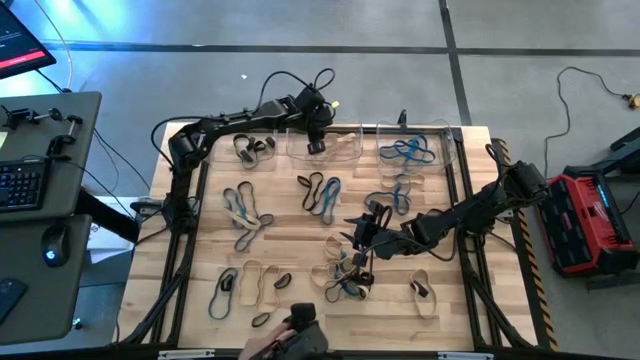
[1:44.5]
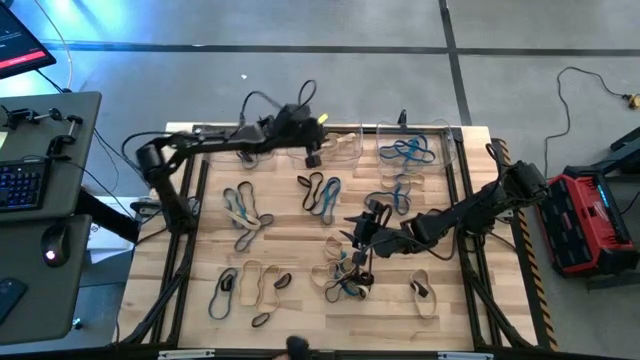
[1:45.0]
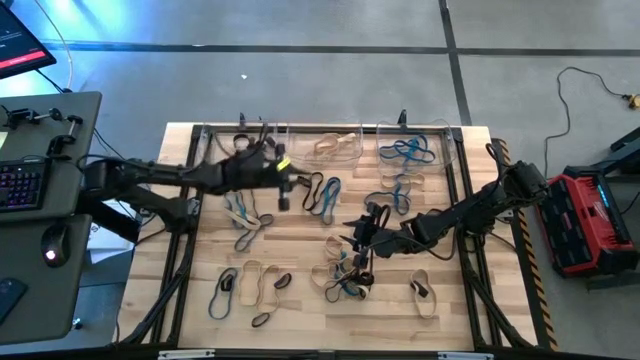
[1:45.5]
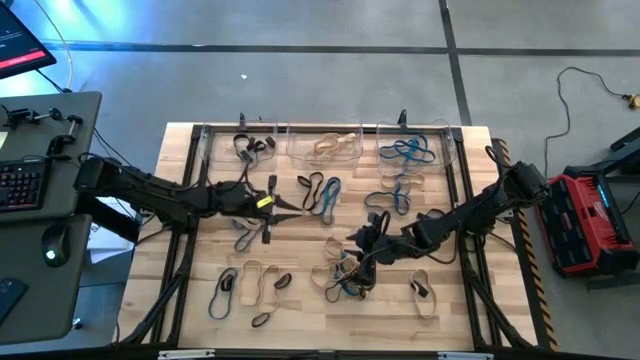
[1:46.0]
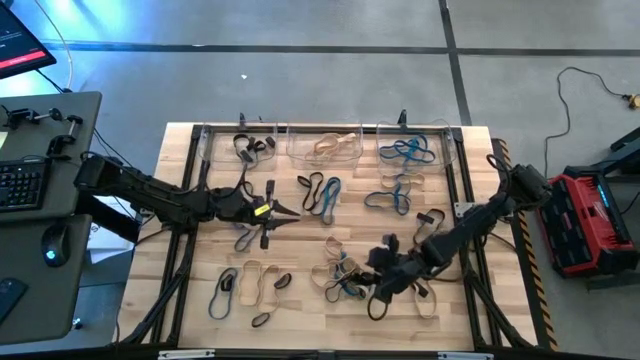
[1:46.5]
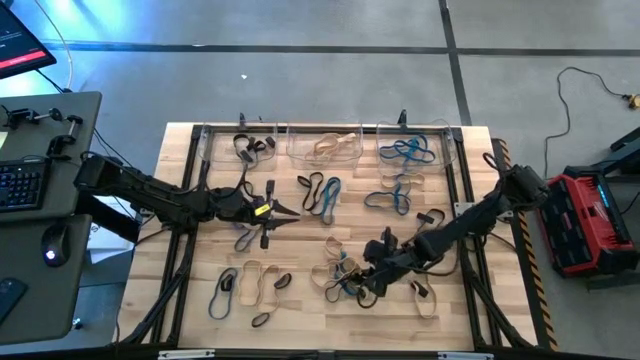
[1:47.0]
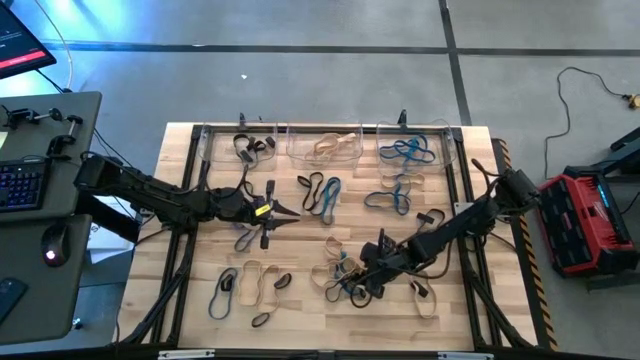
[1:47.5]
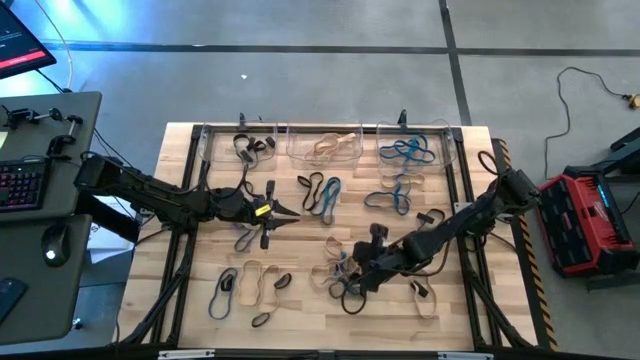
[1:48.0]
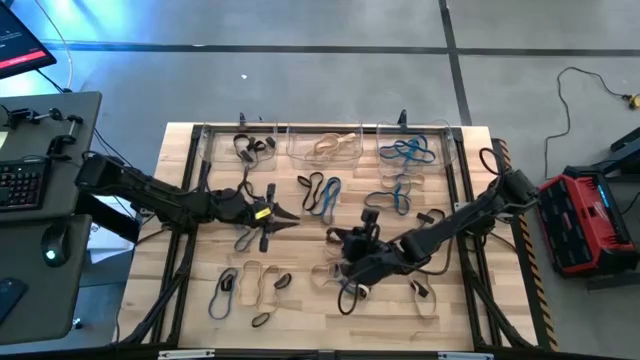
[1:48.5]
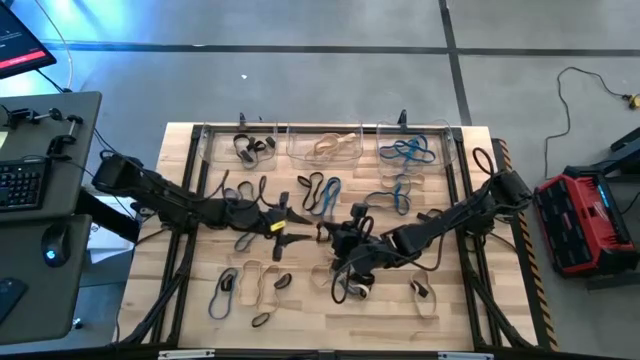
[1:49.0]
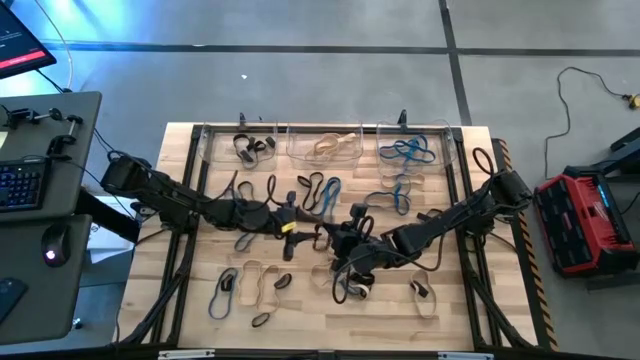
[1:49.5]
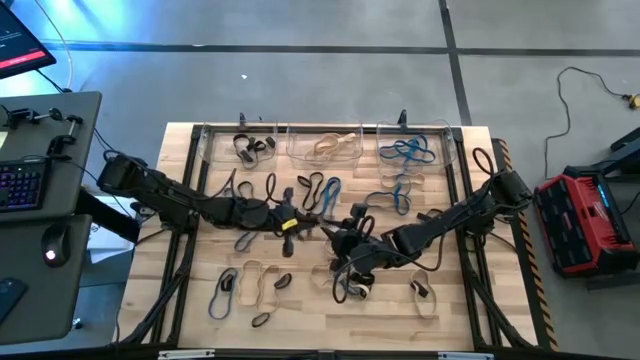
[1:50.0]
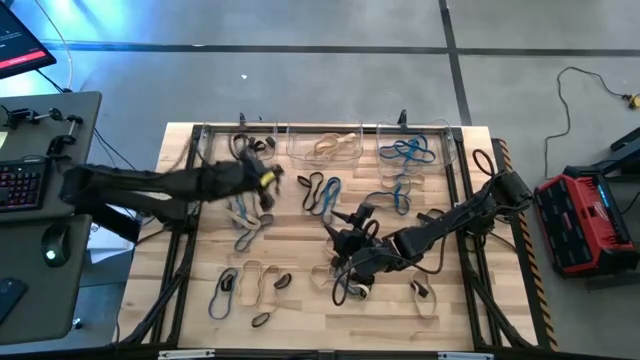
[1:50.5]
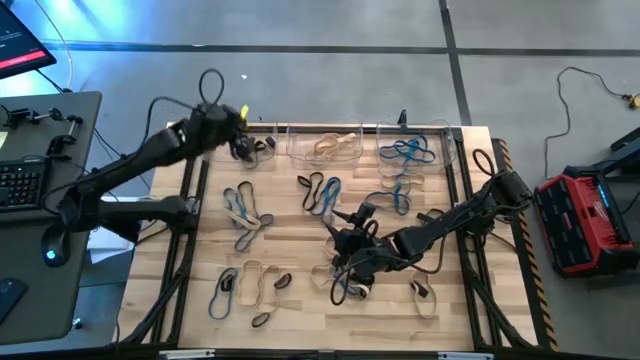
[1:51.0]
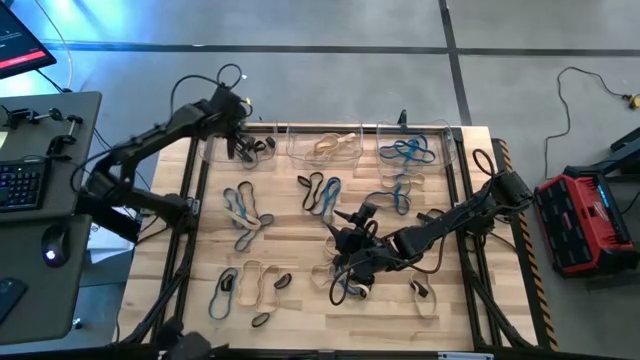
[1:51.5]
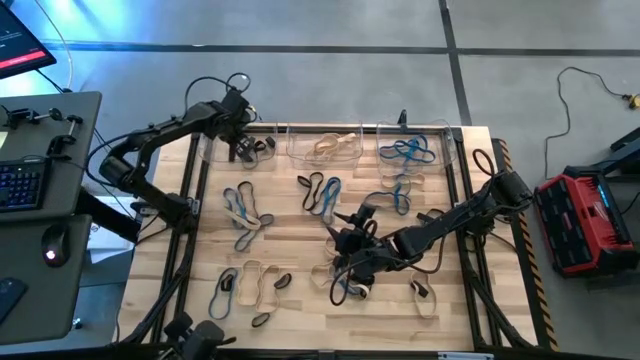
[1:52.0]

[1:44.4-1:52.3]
Task: Sort rubber bands into baskets
Put the black rubber band into the left transparent bin

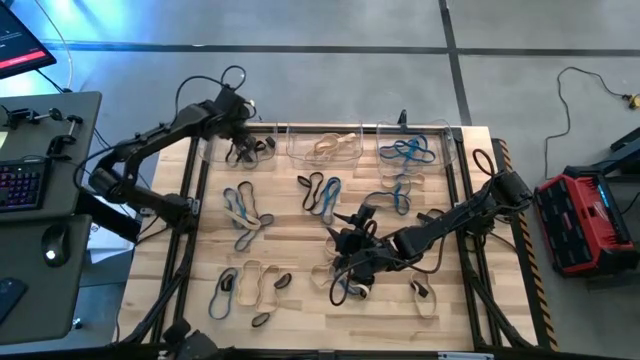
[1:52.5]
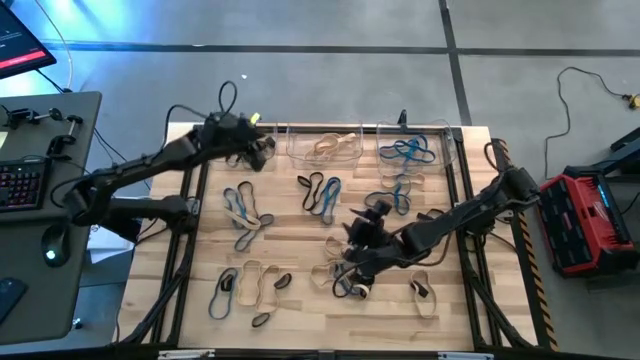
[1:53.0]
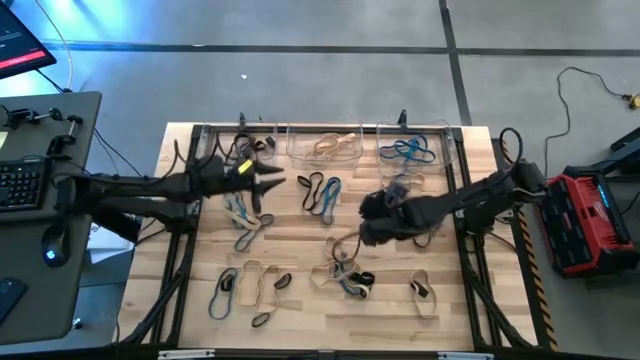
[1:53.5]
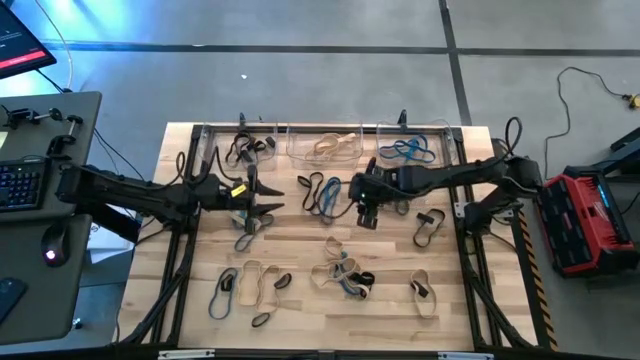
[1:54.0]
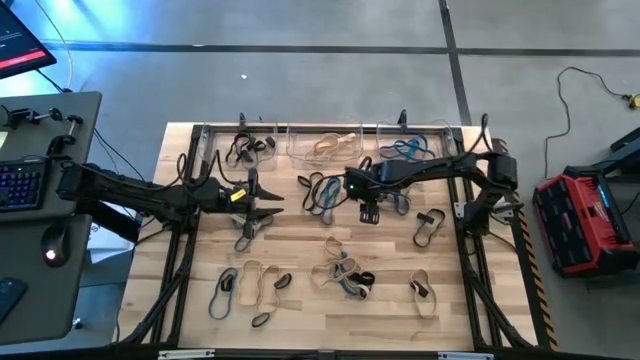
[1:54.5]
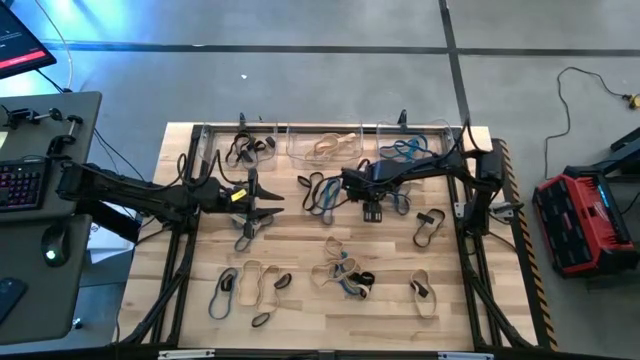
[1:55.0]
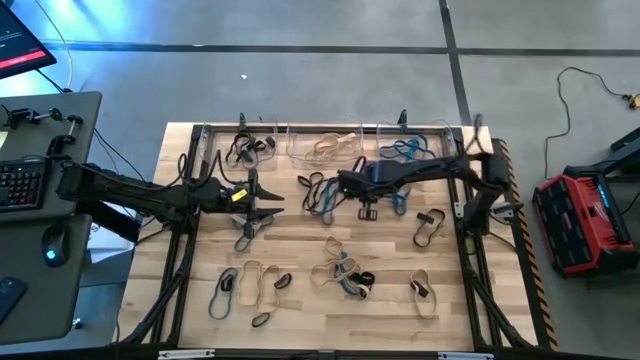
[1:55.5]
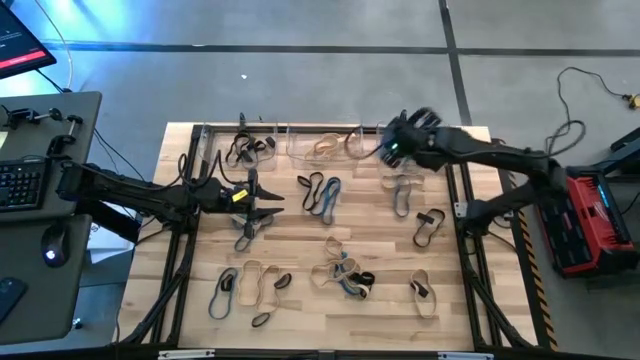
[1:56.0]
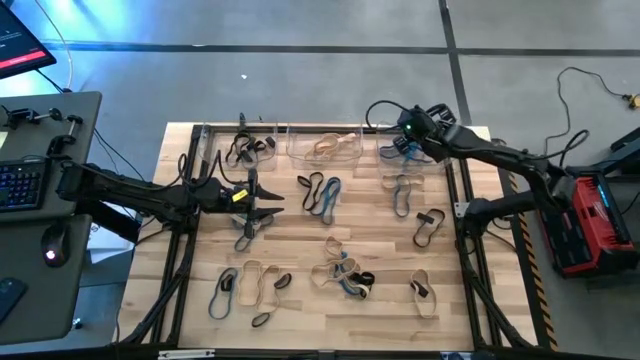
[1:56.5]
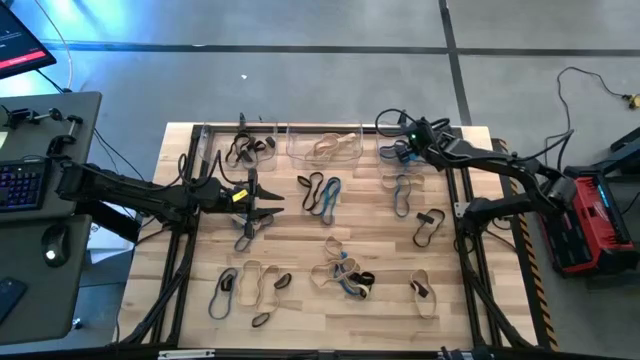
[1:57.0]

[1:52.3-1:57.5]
Put the blue rubber band into the right transparent bin

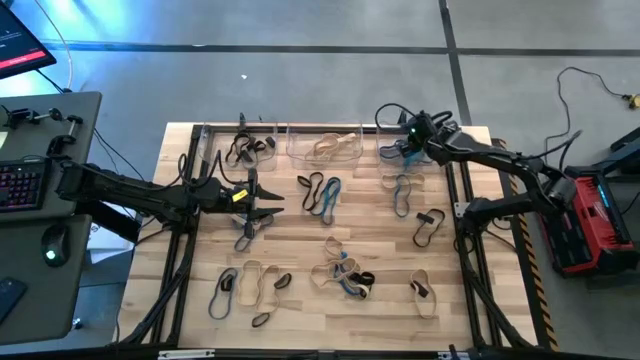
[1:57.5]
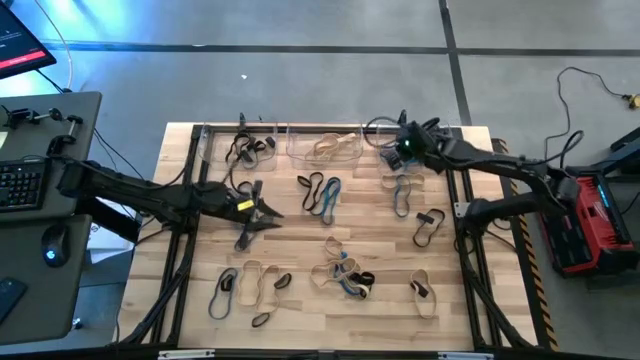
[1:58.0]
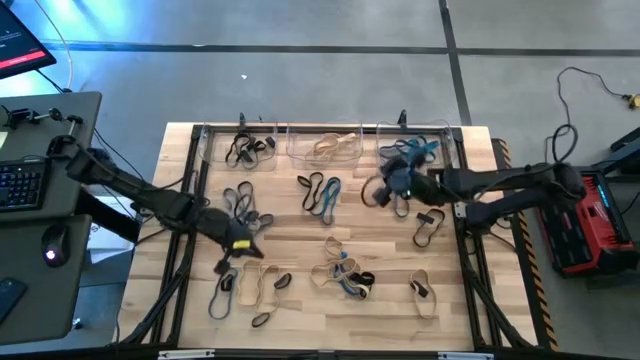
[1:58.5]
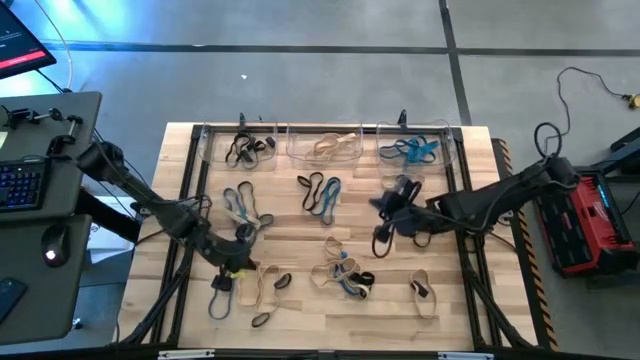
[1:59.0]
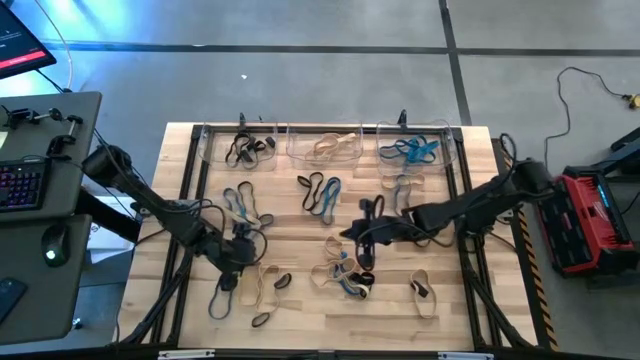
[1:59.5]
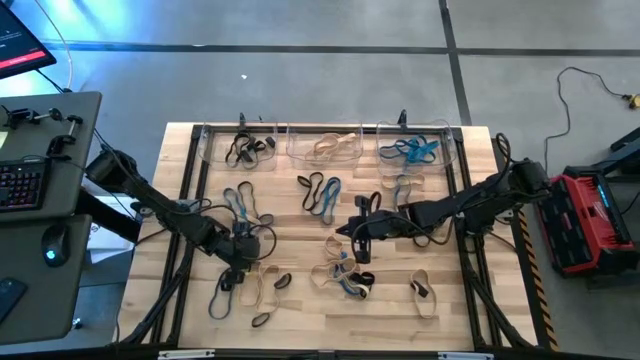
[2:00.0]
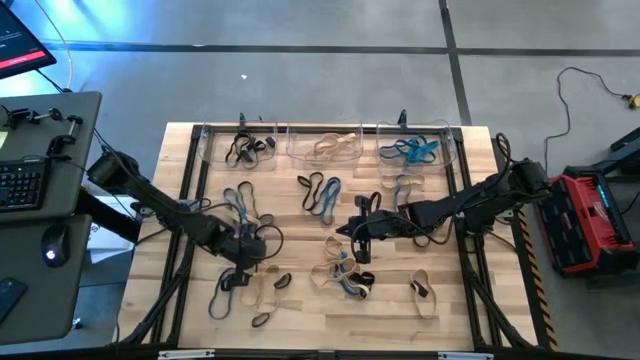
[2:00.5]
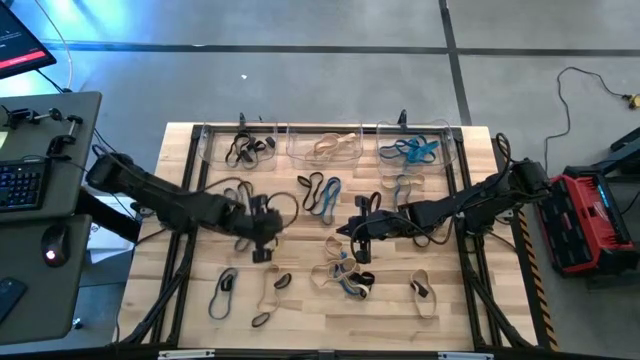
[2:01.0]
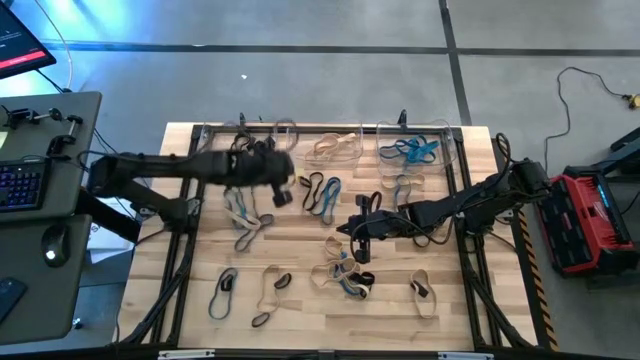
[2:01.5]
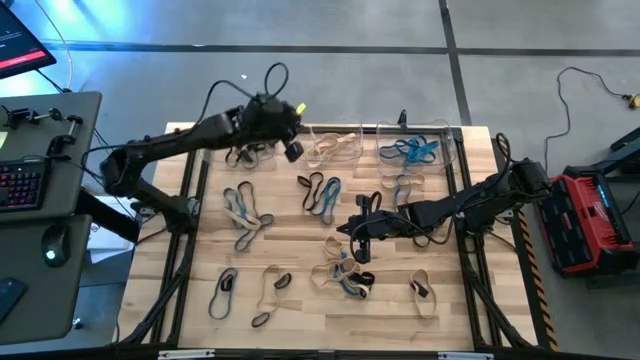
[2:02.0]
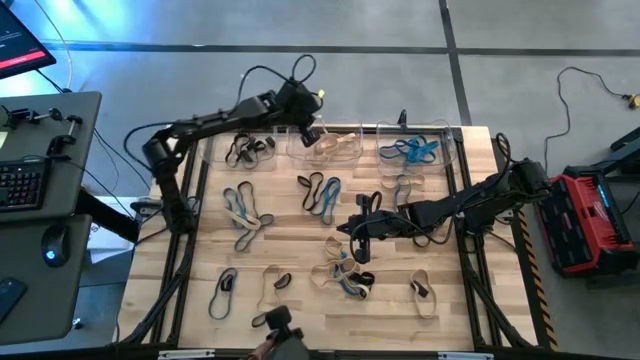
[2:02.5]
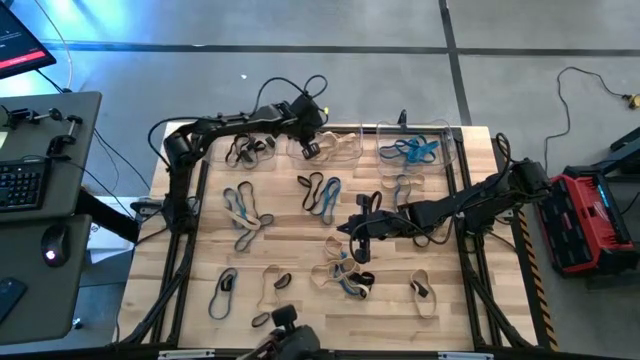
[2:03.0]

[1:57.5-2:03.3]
Put the brown rubber band into the middle transparent bin

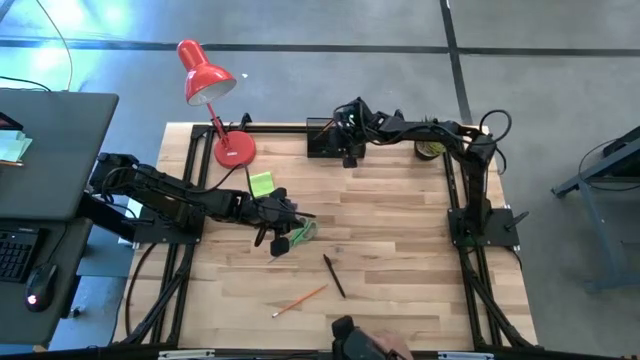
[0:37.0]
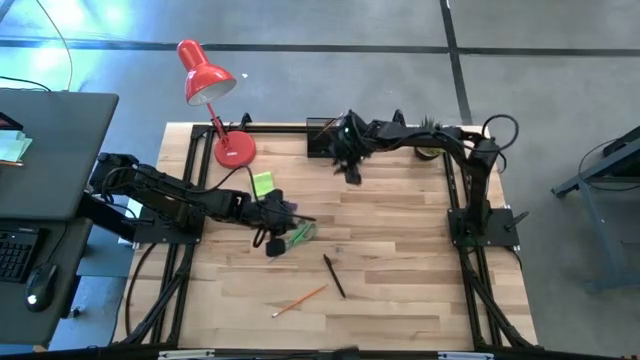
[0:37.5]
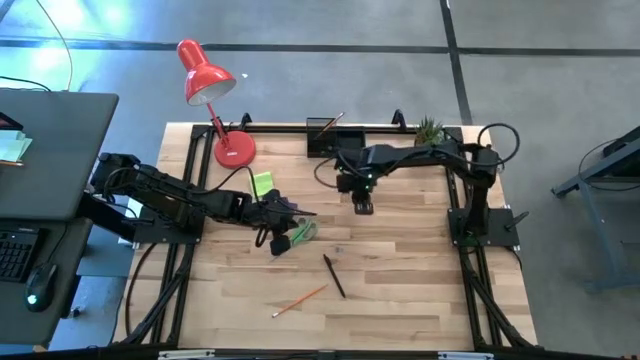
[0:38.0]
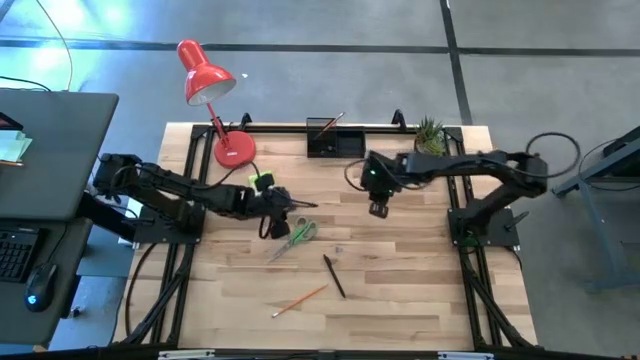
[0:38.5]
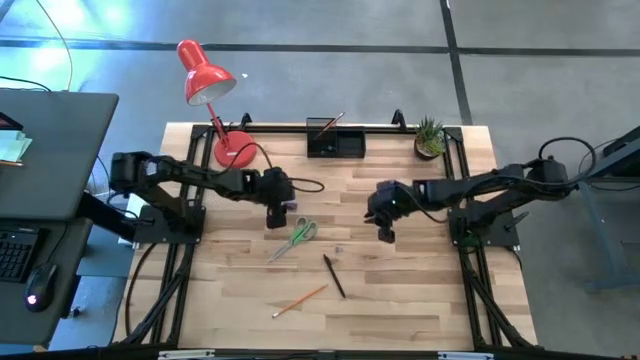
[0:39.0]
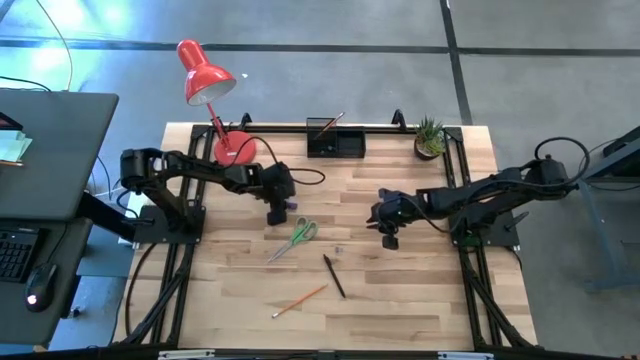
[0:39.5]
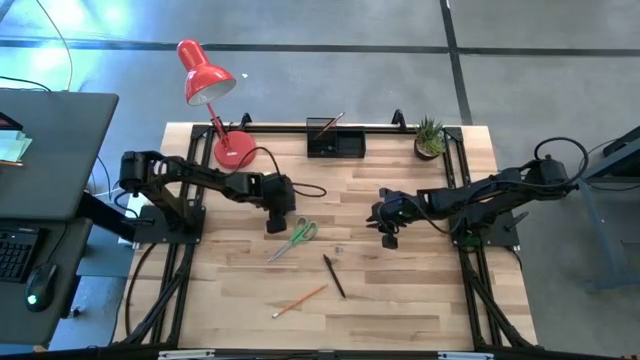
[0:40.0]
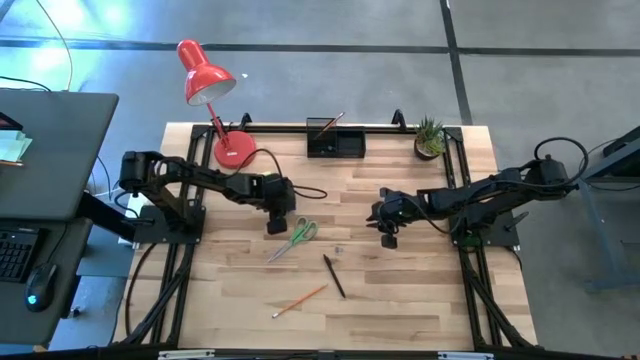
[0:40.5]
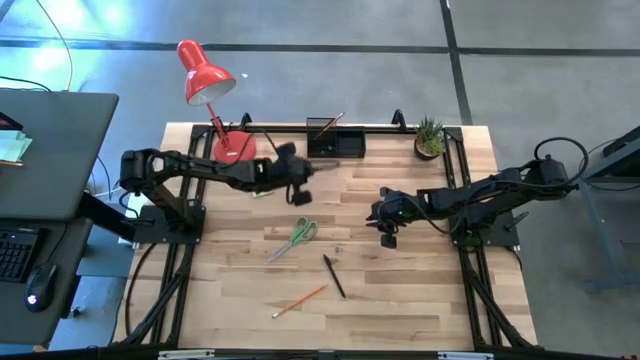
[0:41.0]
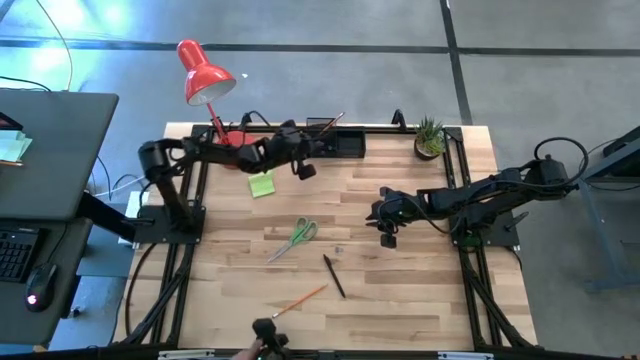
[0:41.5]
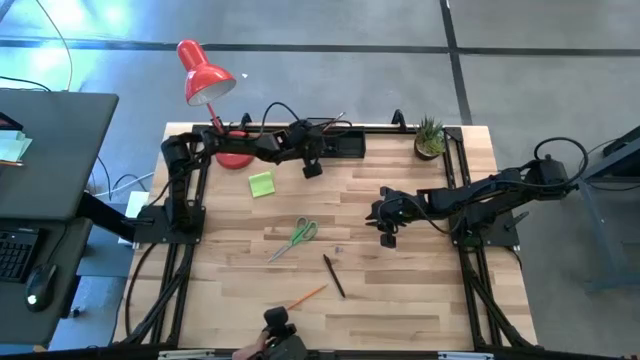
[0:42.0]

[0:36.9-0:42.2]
Task: Pick and place office supplies into organizer
Put the violet eraser into the desk organizer
